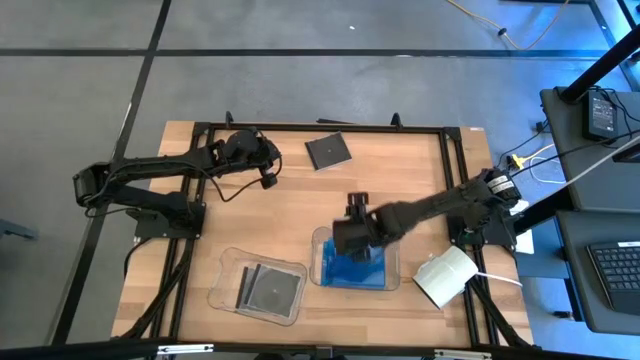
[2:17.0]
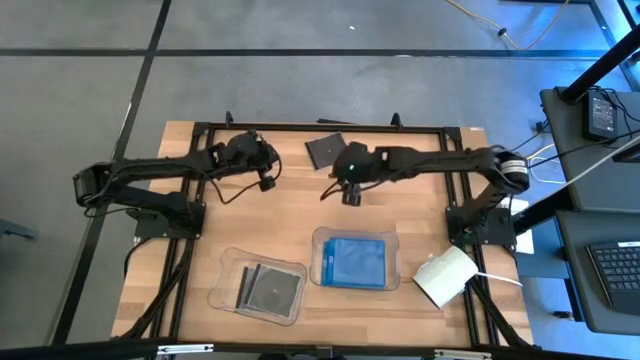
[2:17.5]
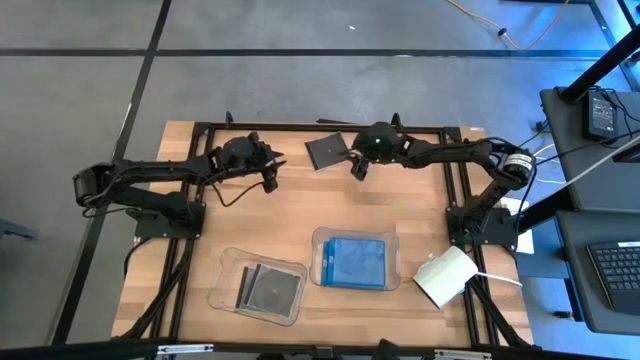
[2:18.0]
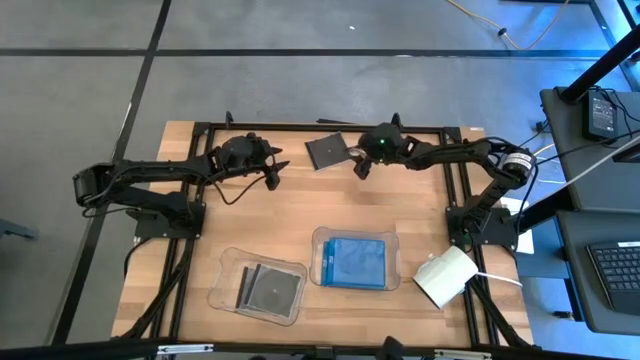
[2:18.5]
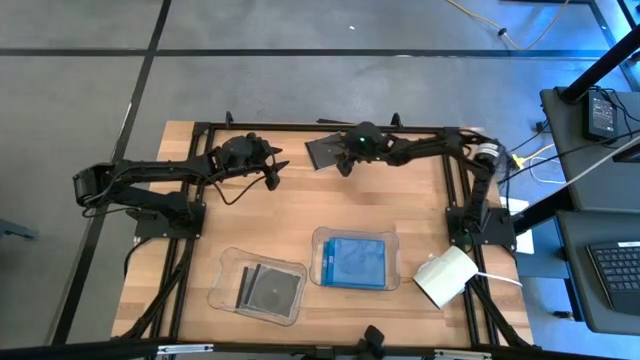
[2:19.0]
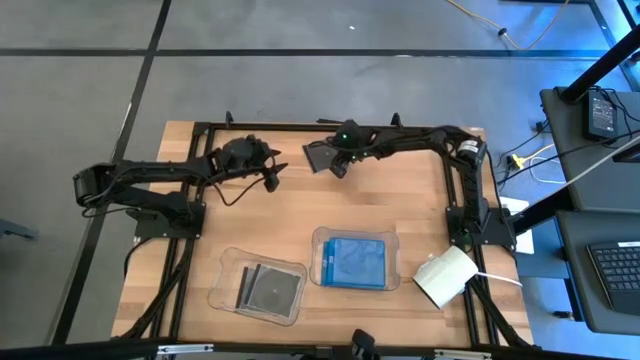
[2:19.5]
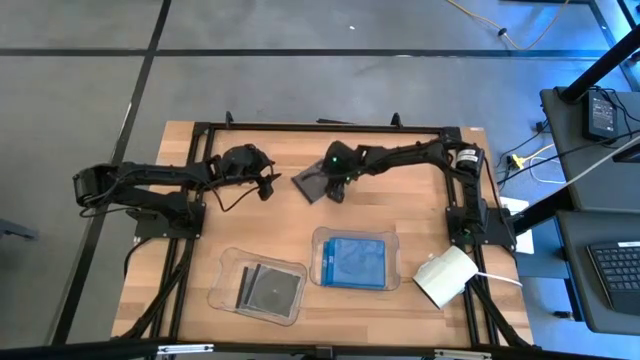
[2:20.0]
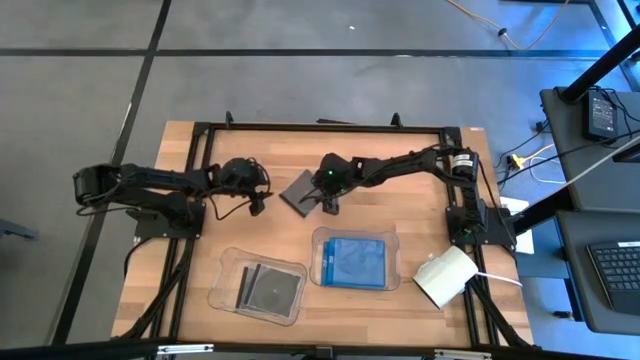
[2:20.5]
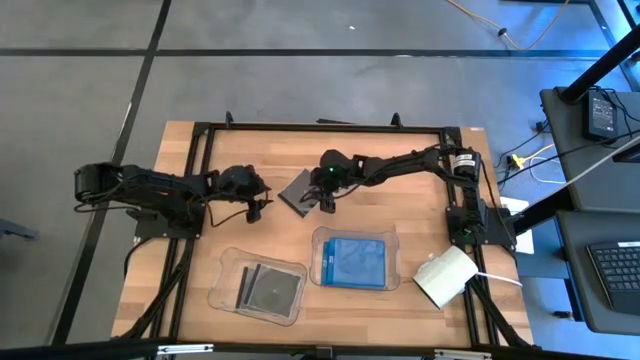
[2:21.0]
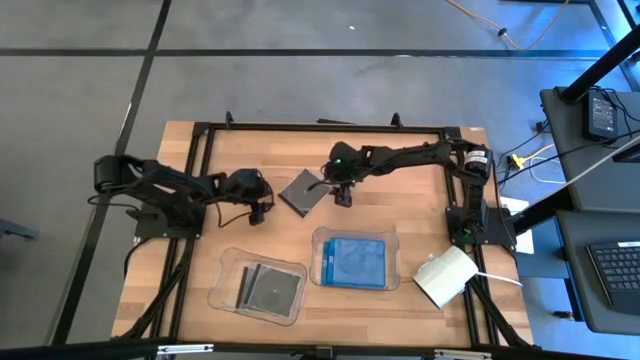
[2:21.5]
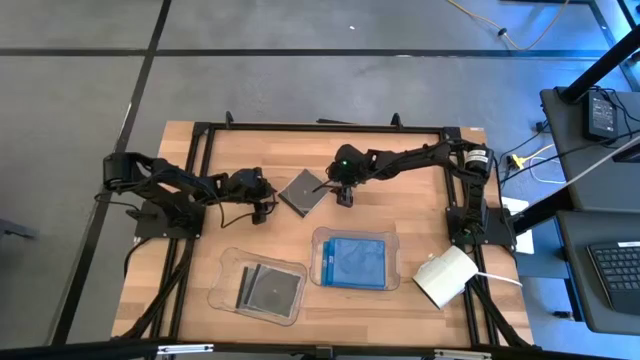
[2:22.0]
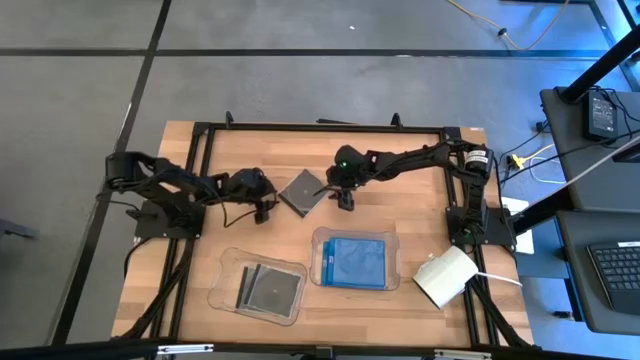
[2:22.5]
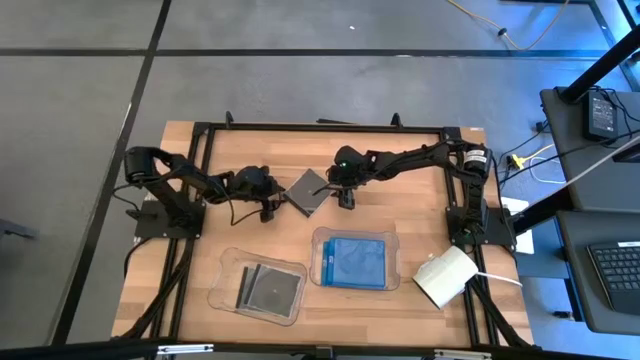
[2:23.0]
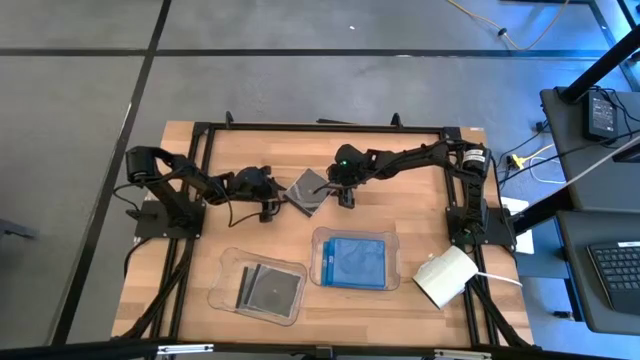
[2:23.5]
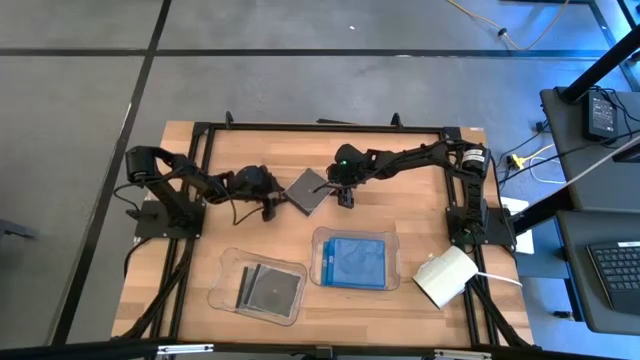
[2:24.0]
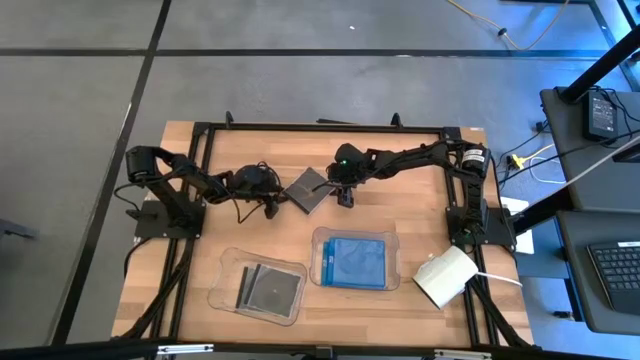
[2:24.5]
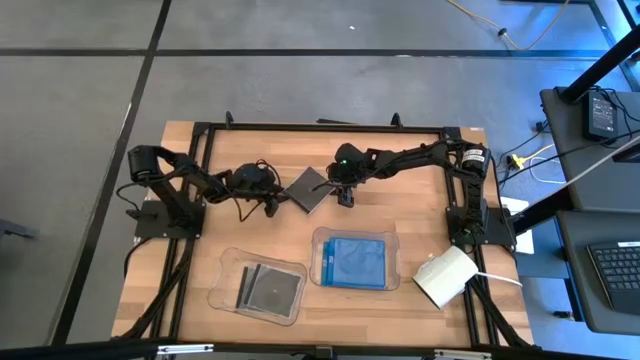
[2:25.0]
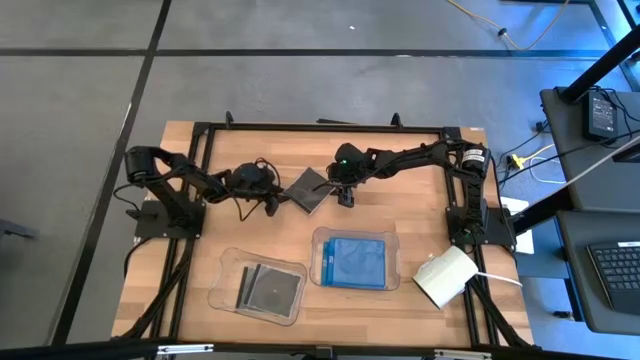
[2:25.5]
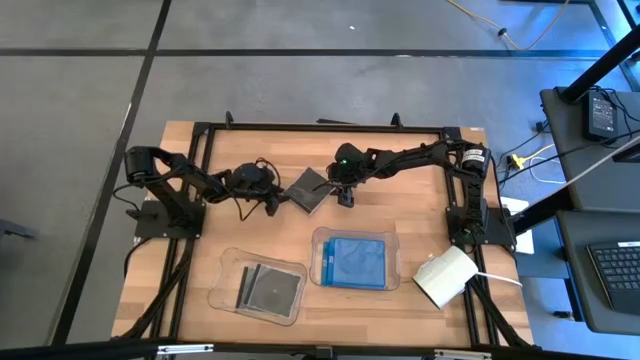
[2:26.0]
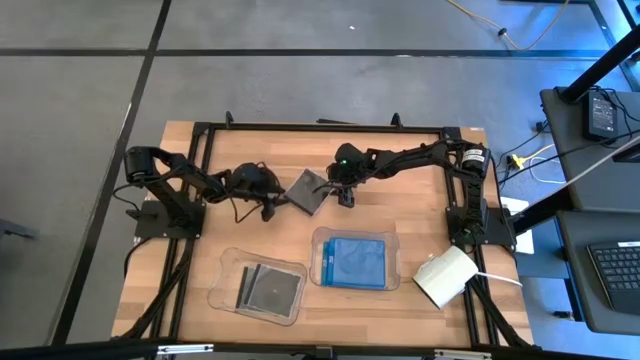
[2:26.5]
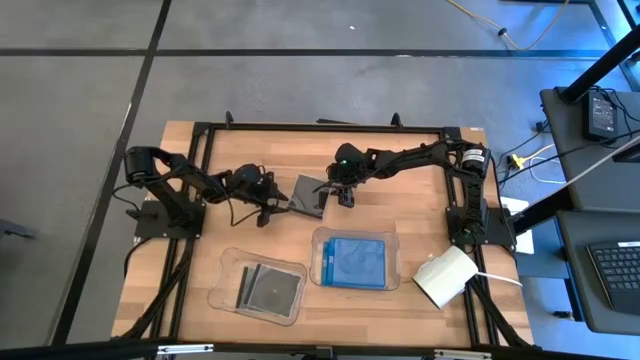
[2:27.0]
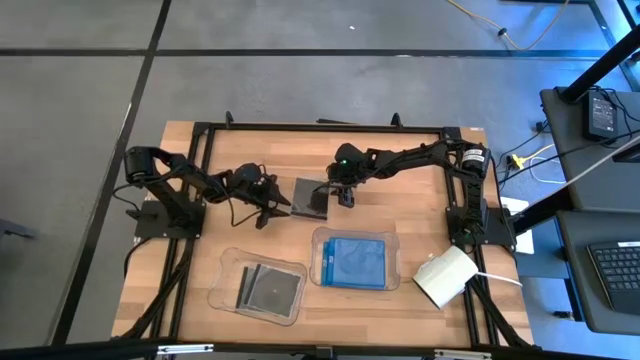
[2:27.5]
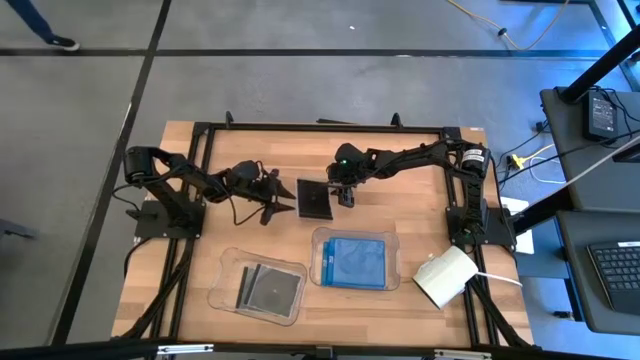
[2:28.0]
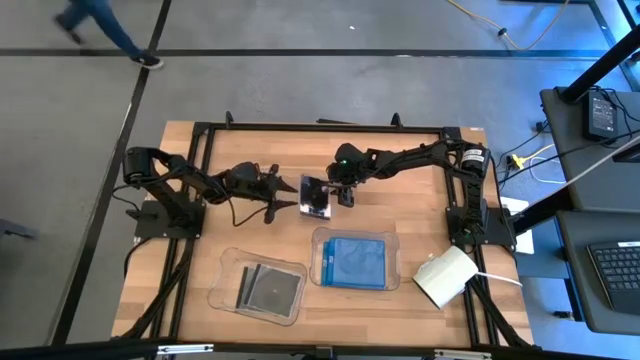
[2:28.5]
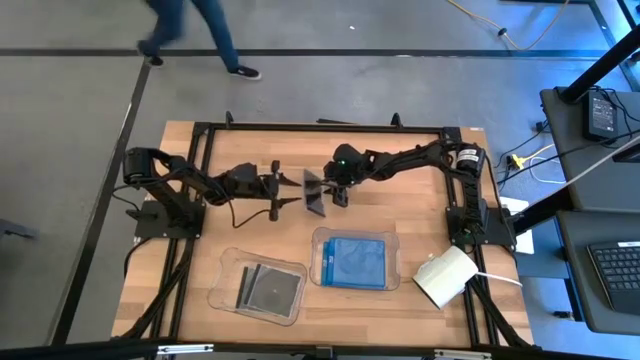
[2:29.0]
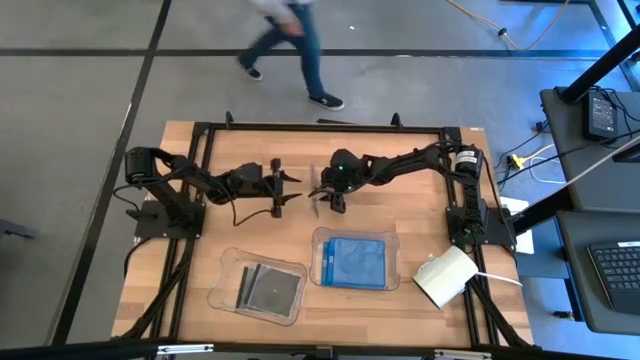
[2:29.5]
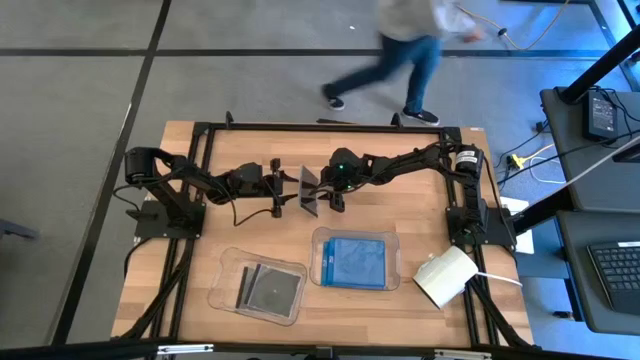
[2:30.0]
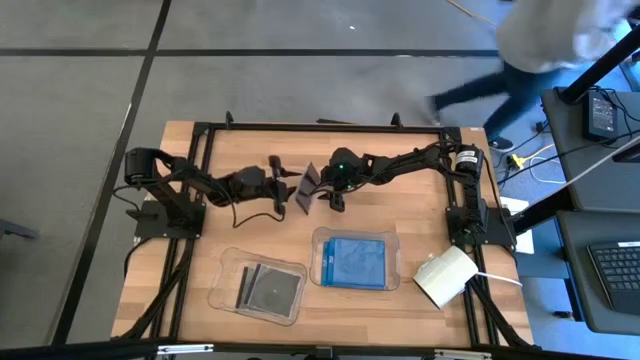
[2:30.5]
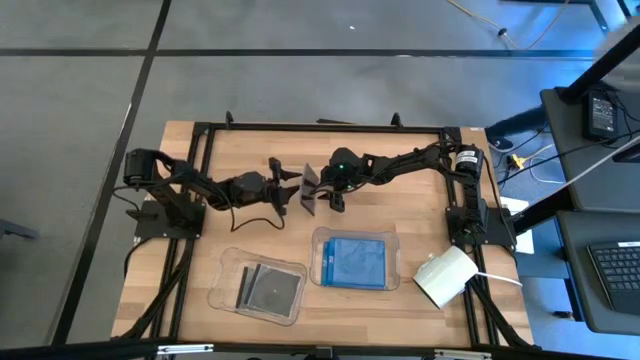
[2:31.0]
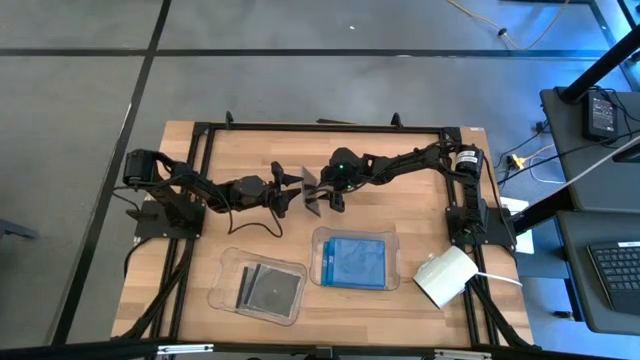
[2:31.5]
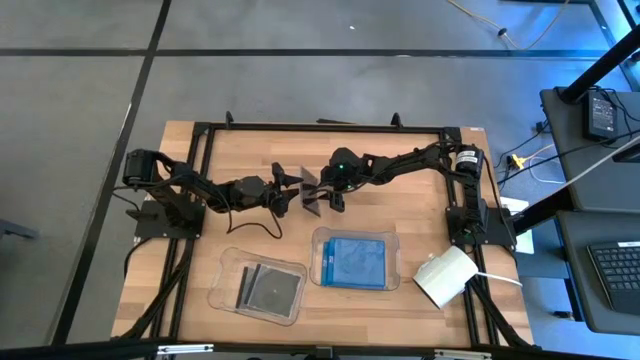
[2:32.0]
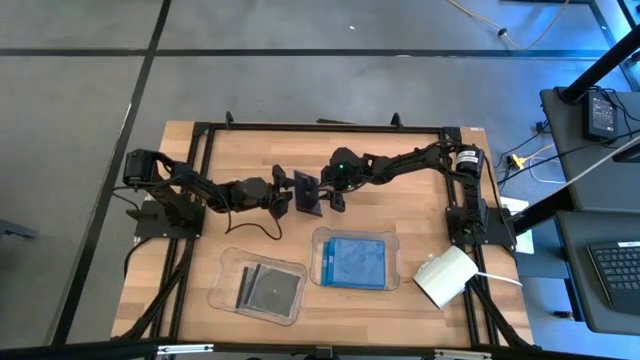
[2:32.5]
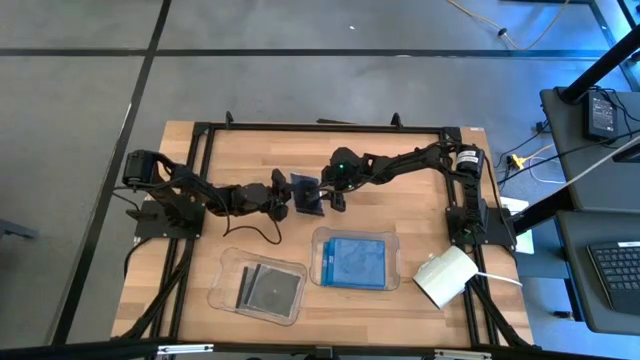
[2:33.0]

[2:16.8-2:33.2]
Task: Pick & place jewel cases by type
Put the black CD case into the left transparent bin
